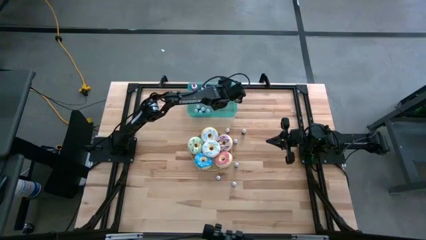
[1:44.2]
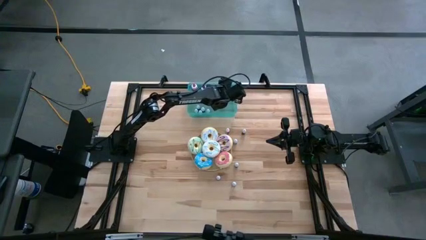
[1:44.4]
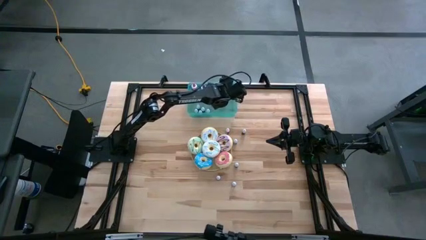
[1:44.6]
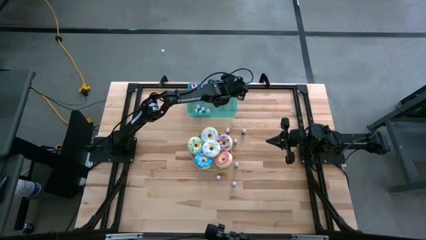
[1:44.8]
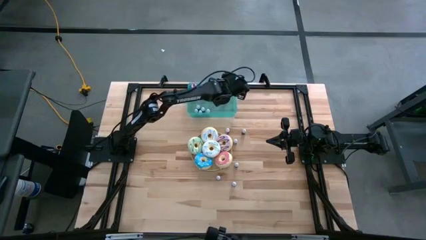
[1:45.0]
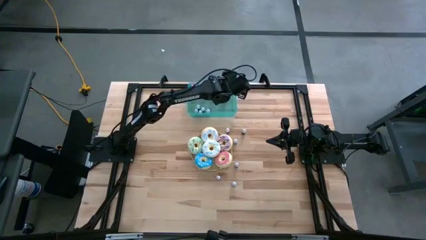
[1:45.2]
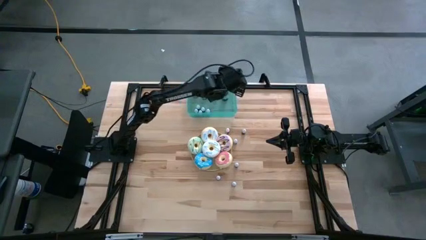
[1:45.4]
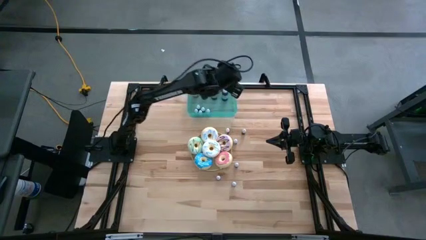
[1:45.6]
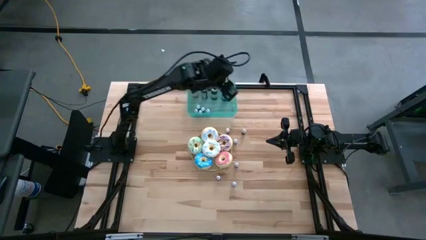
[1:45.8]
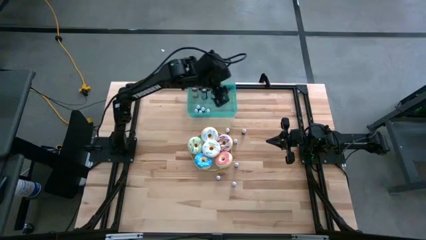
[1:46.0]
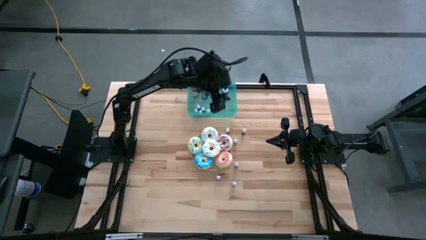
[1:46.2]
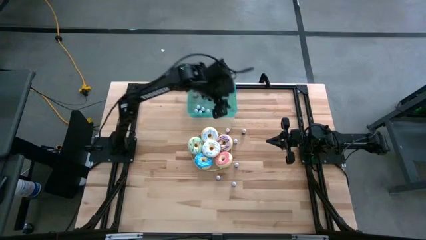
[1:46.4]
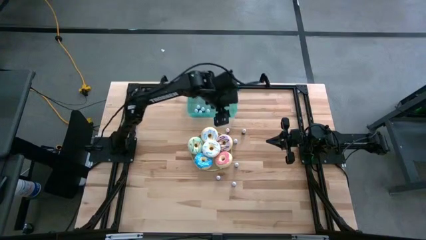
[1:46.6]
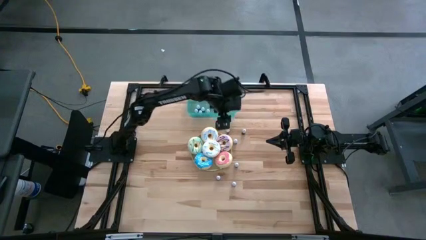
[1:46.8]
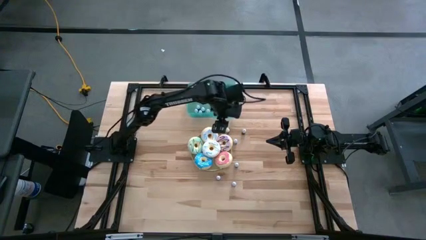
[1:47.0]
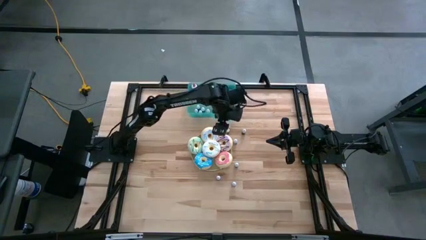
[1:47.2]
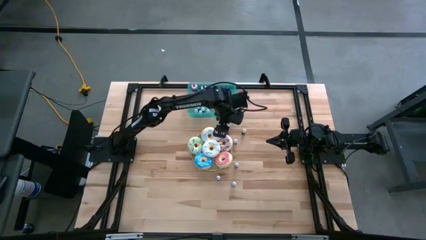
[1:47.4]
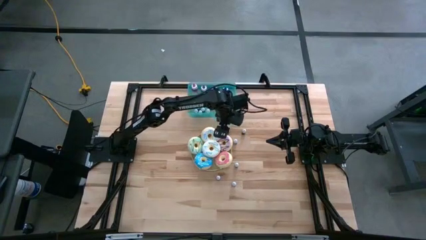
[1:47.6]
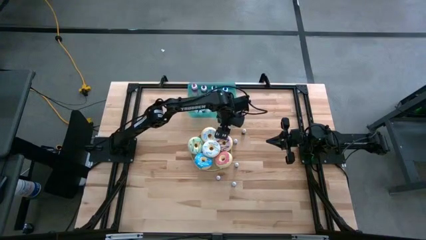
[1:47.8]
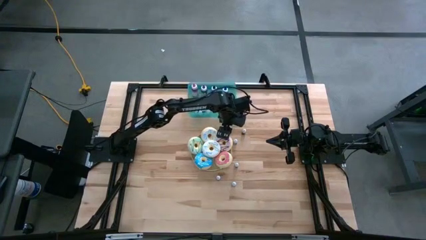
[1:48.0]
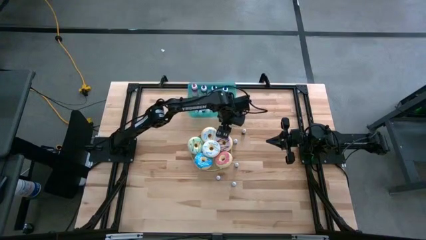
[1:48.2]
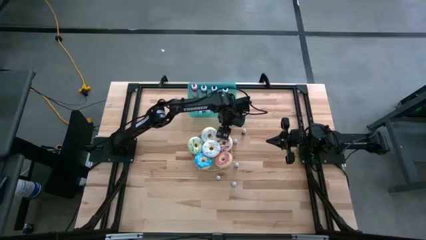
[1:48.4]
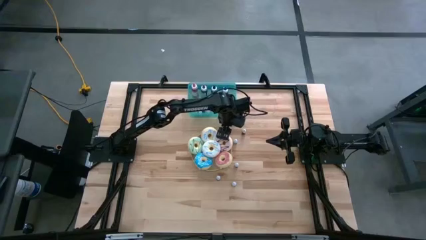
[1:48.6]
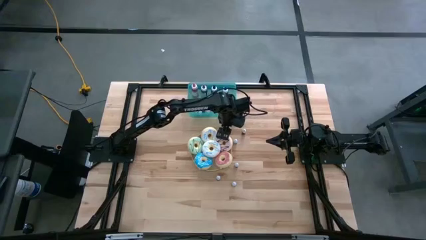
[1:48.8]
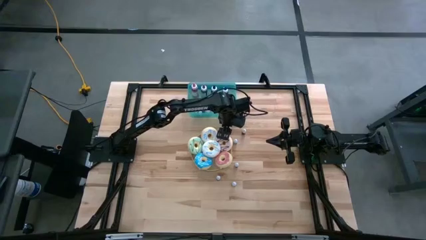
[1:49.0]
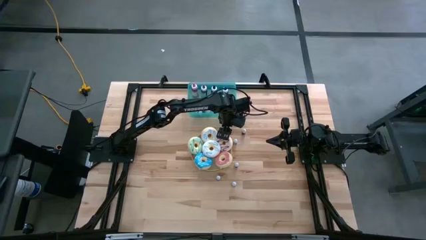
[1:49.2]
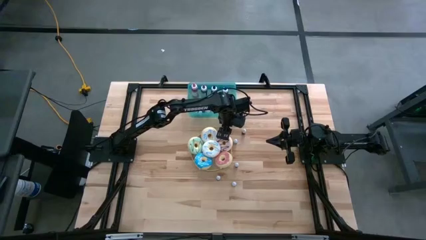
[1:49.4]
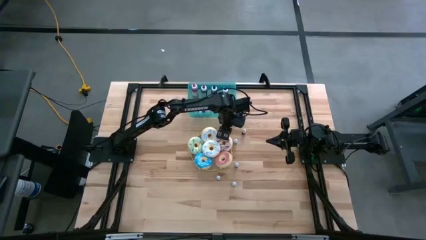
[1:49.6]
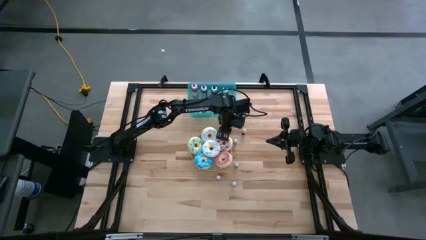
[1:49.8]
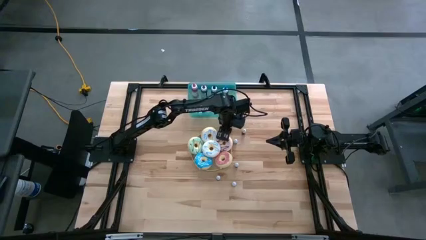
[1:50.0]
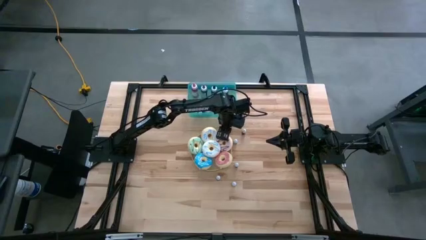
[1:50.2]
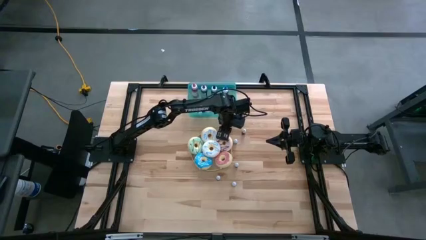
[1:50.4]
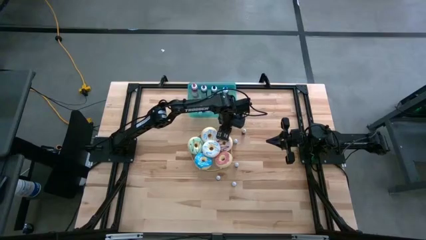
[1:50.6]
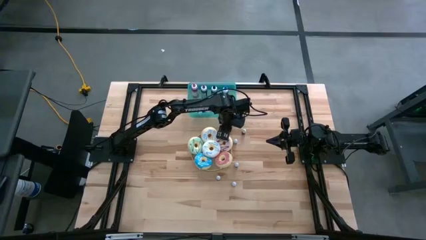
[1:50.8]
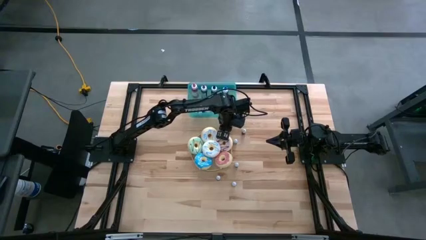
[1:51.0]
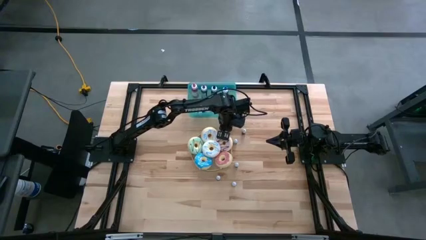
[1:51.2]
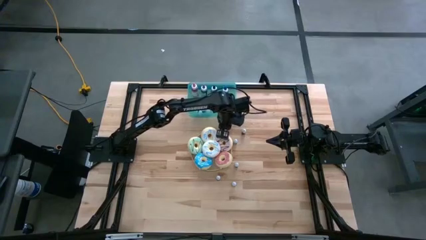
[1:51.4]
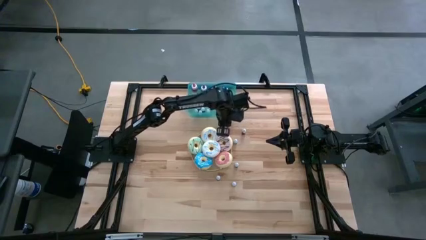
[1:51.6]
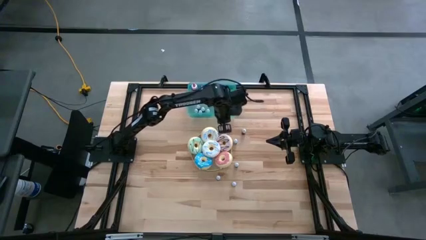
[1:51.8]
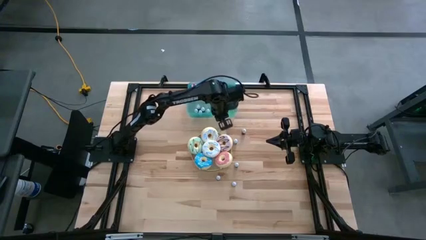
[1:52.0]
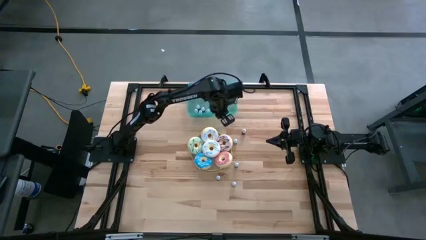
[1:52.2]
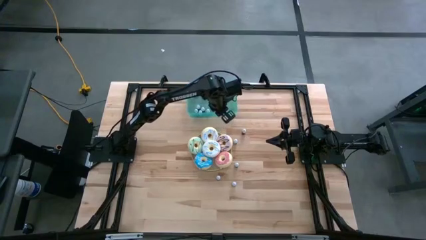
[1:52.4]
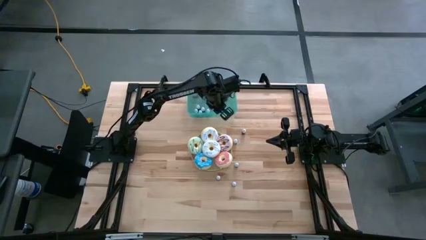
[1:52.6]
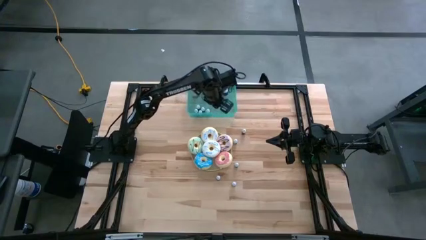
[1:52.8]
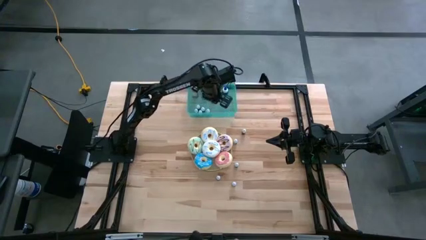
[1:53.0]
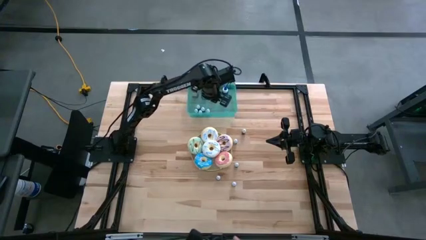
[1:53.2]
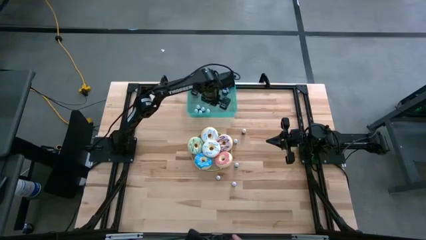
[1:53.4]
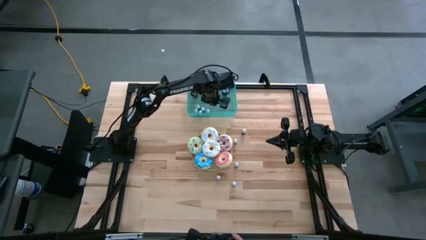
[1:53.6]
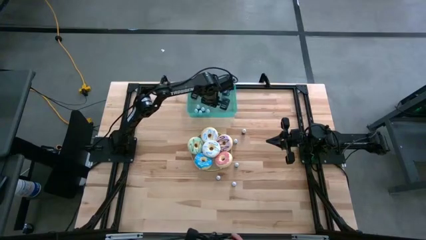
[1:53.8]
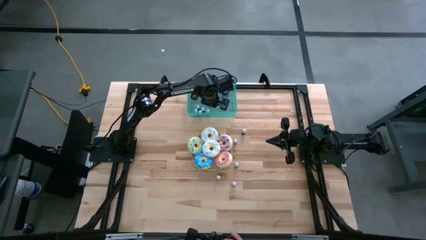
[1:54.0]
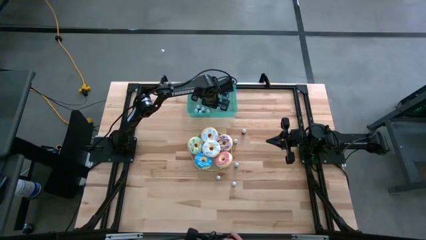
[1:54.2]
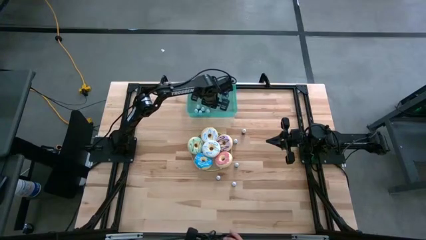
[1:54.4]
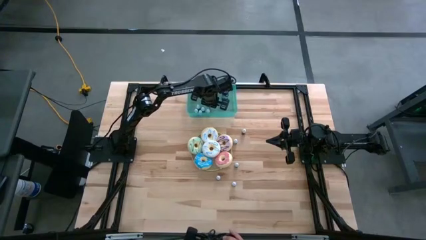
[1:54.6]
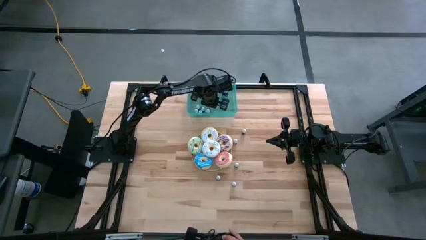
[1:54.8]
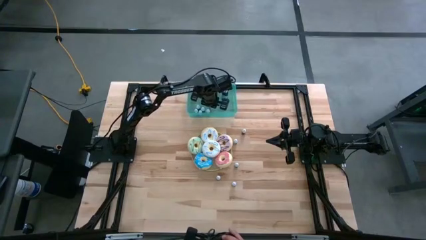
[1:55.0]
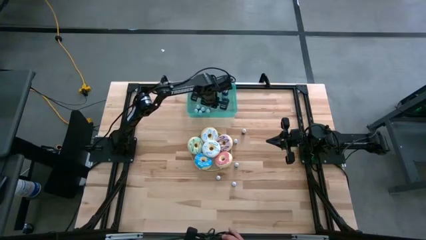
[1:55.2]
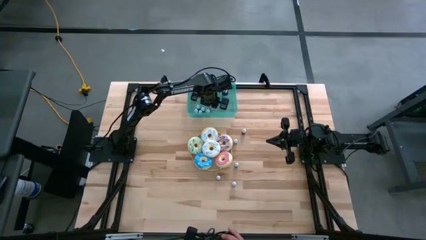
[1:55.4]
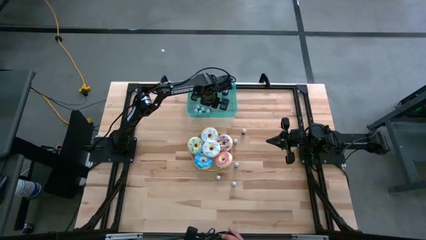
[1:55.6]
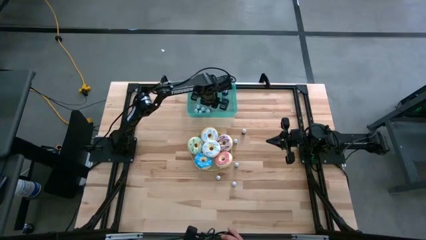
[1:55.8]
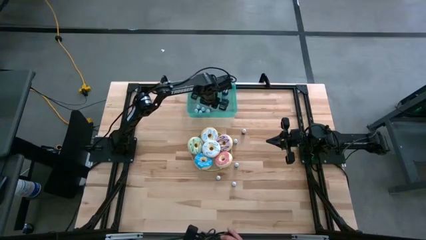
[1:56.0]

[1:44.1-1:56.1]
Task: Pick & Place food coloring
Put the top small black food coloring bottle into the green container

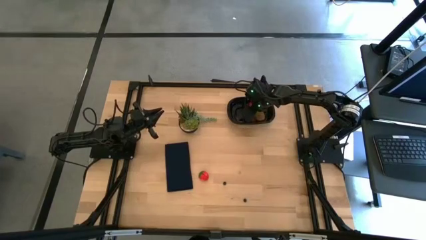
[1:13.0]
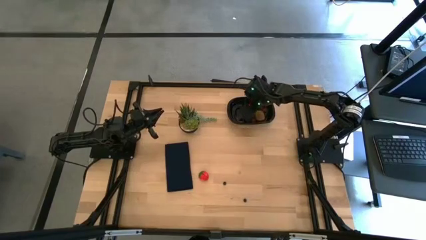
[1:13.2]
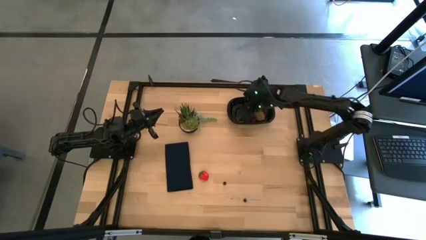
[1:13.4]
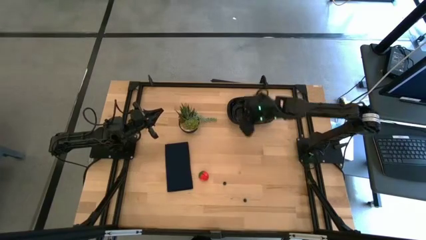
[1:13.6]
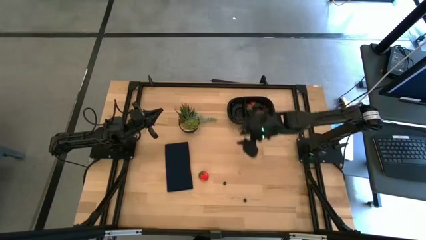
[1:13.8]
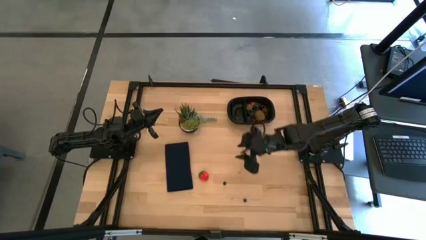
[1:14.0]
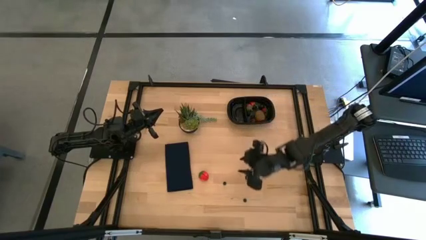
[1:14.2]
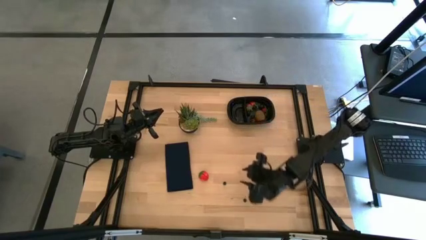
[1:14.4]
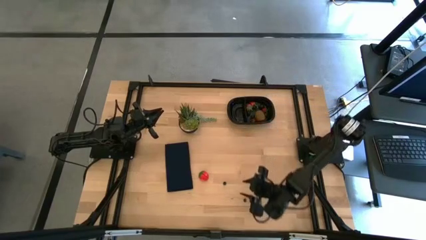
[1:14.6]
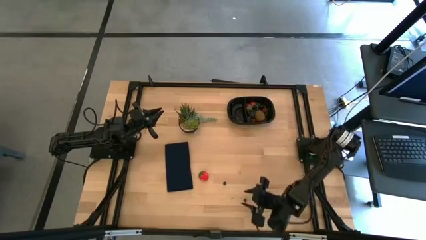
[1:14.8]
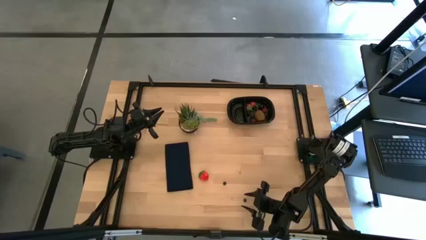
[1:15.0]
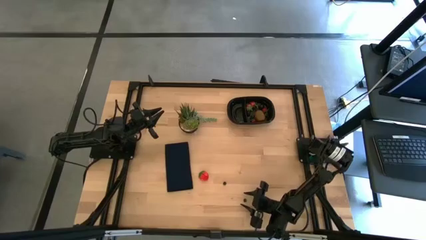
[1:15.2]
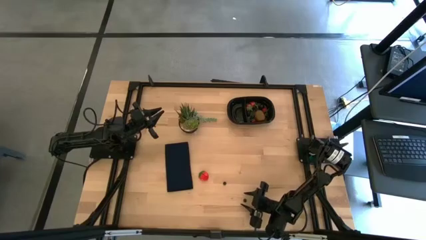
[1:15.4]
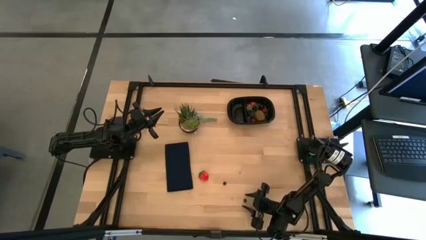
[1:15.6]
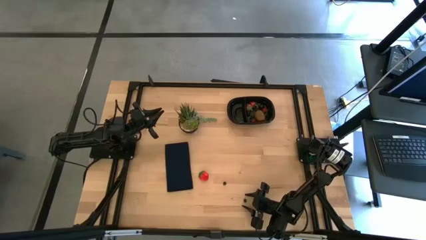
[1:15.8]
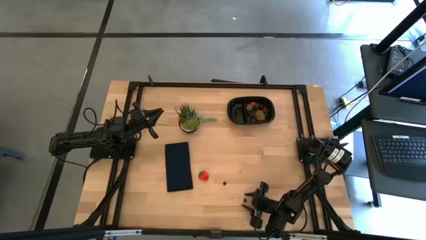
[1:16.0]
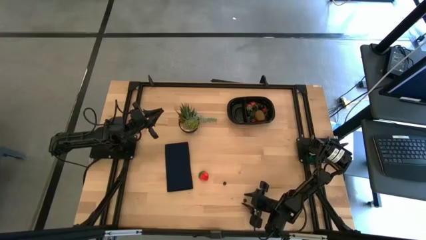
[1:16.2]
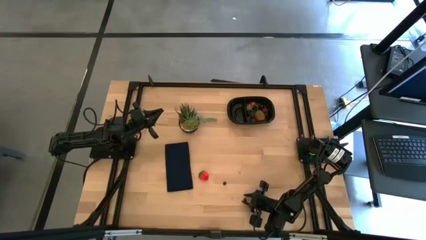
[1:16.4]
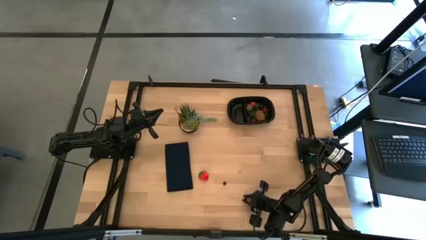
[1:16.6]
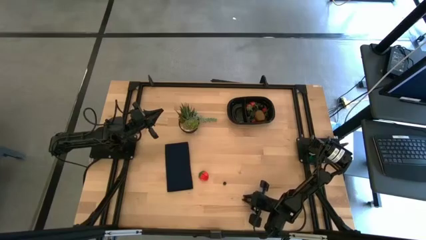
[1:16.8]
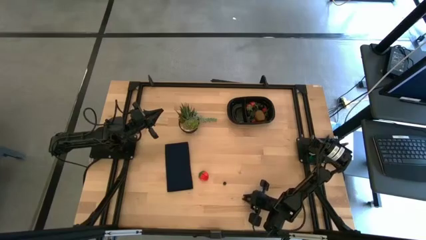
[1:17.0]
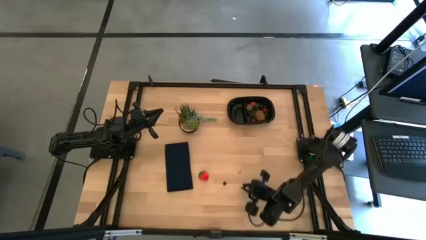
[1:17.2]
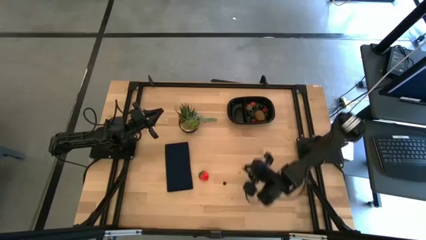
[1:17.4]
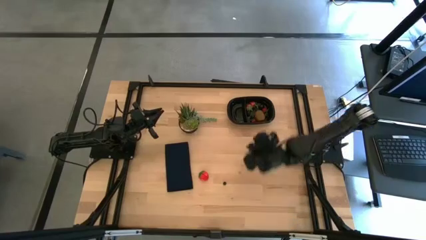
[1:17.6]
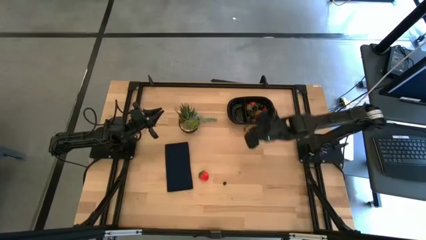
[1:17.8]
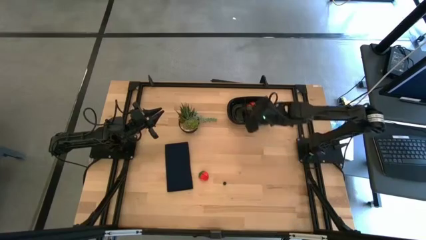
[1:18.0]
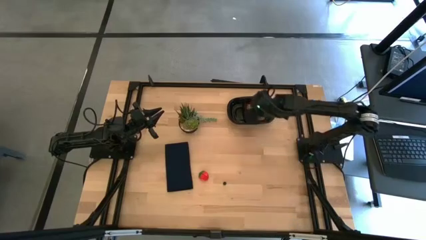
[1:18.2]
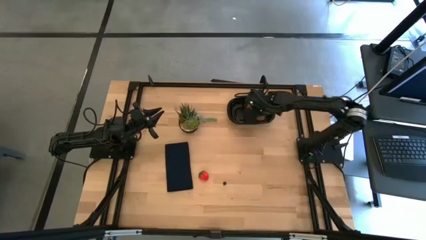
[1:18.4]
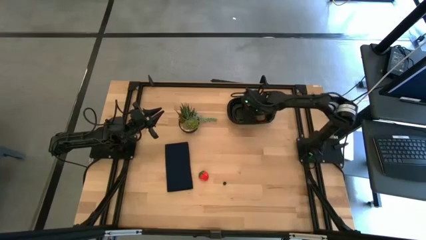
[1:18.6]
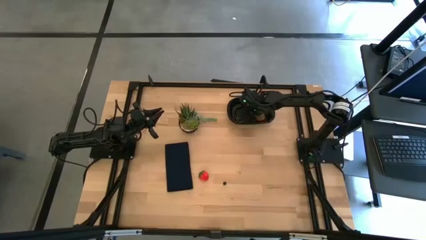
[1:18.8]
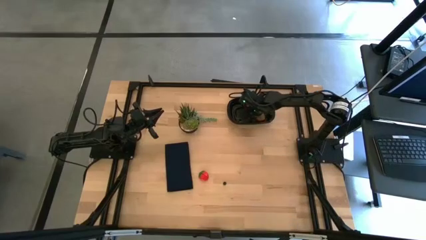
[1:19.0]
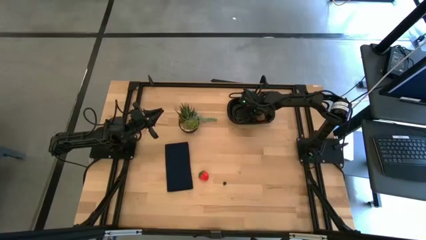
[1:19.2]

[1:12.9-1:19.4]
Task: Pick and placing Produce into tupperware
Put the bottom blueberry into the black container
